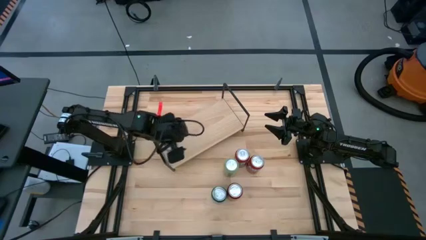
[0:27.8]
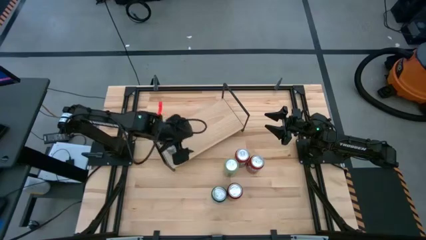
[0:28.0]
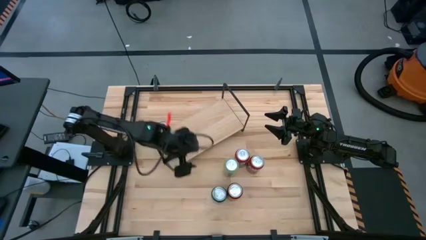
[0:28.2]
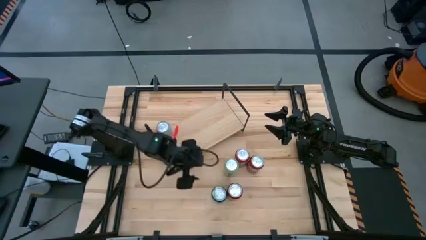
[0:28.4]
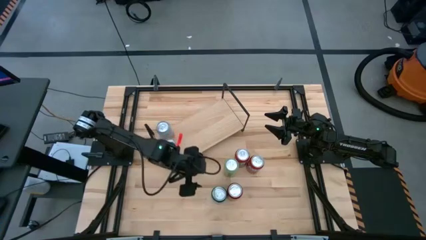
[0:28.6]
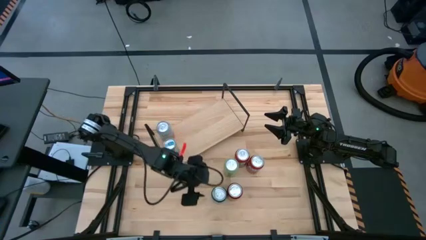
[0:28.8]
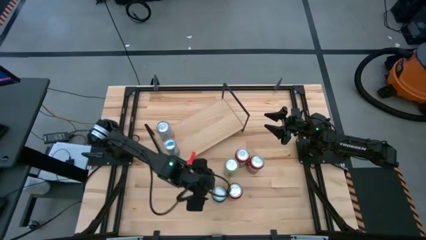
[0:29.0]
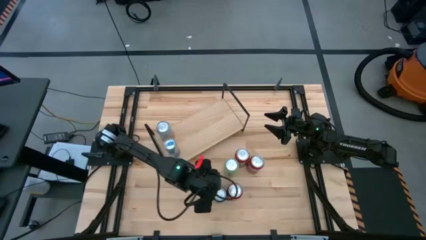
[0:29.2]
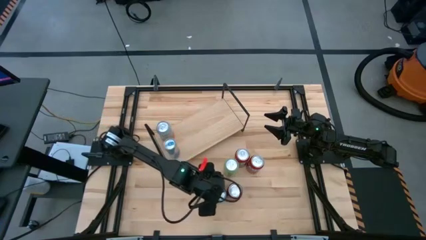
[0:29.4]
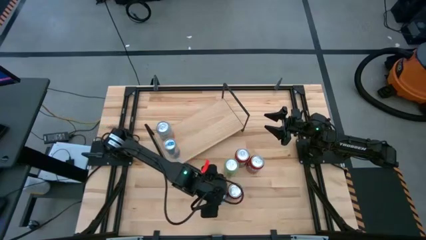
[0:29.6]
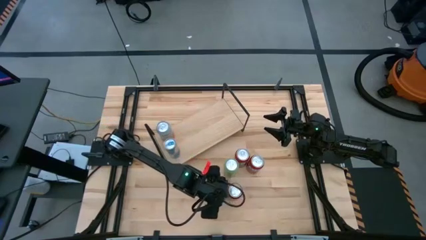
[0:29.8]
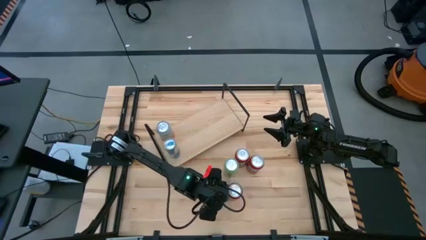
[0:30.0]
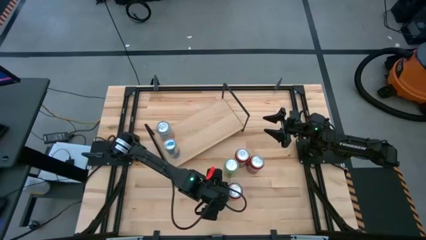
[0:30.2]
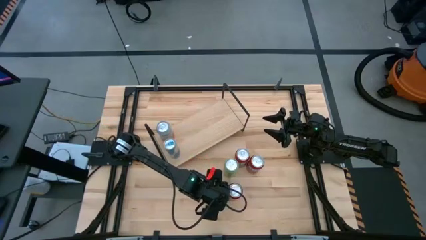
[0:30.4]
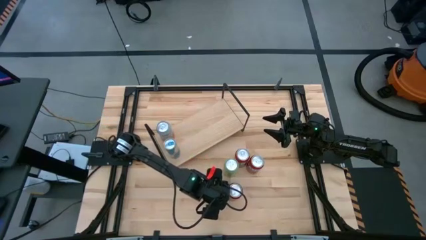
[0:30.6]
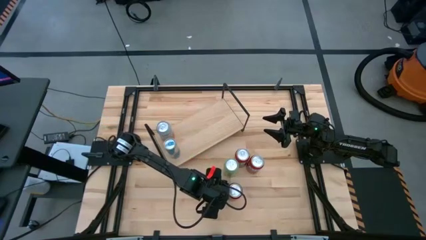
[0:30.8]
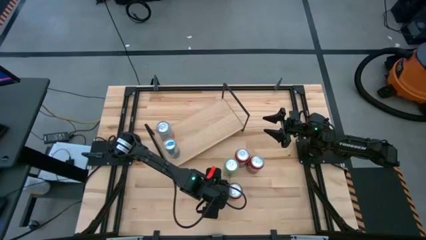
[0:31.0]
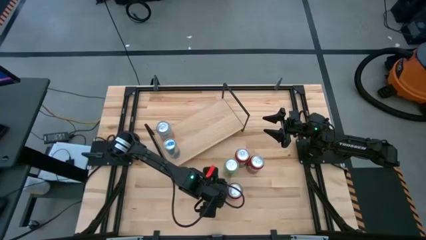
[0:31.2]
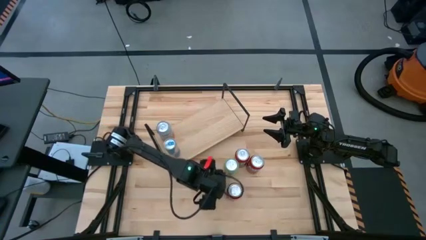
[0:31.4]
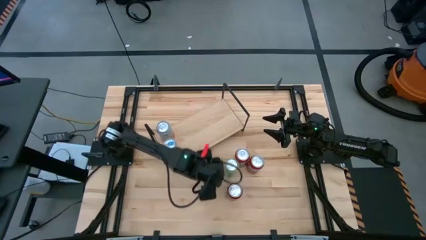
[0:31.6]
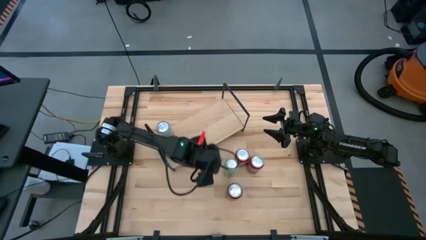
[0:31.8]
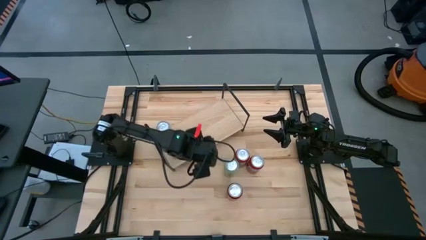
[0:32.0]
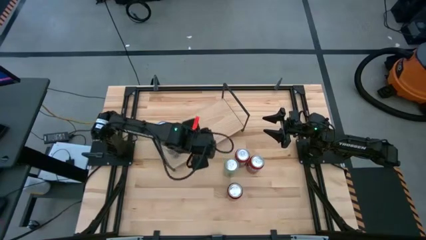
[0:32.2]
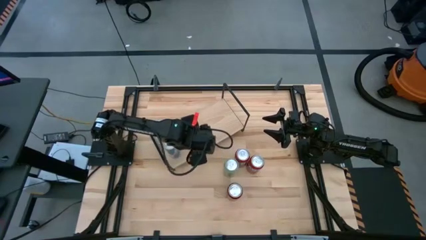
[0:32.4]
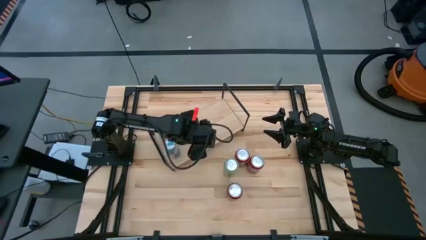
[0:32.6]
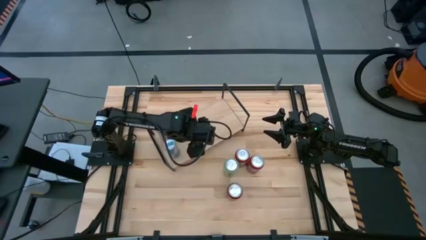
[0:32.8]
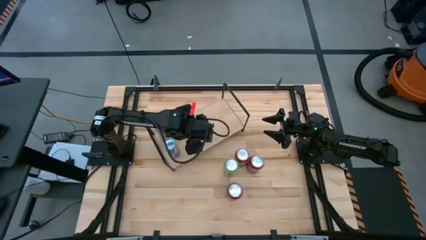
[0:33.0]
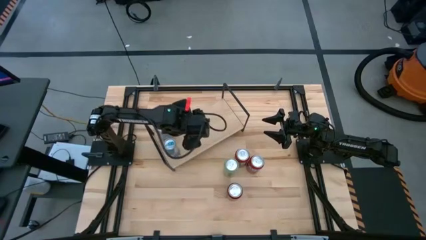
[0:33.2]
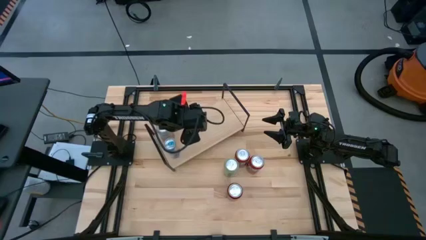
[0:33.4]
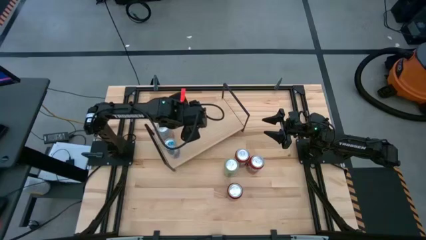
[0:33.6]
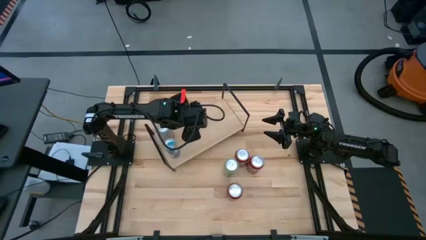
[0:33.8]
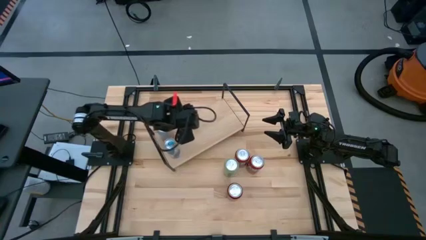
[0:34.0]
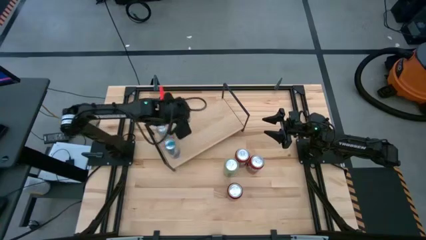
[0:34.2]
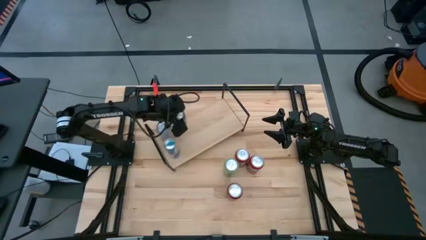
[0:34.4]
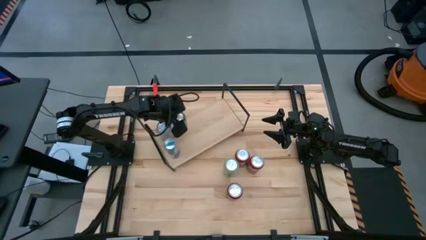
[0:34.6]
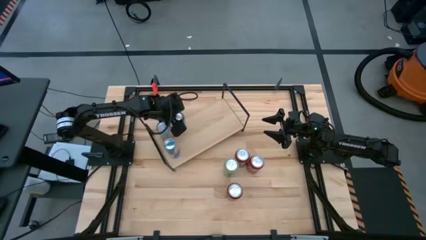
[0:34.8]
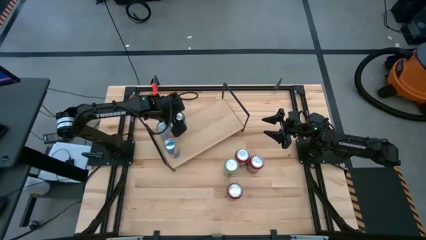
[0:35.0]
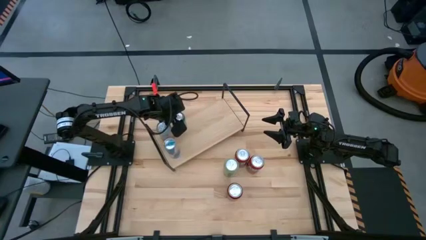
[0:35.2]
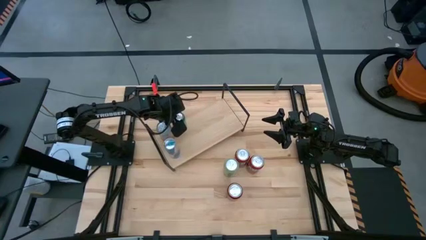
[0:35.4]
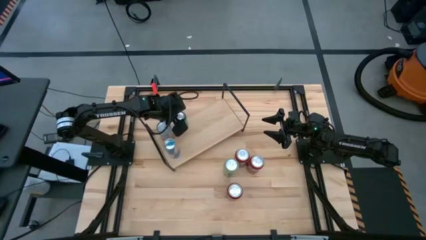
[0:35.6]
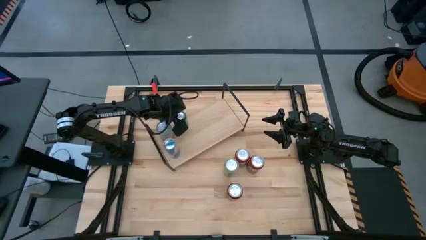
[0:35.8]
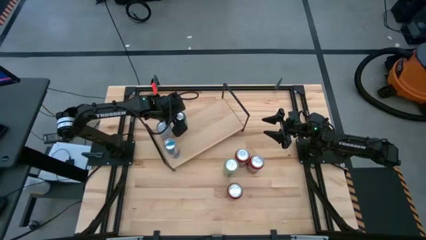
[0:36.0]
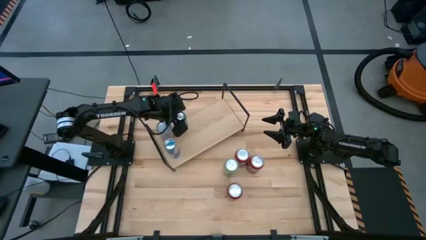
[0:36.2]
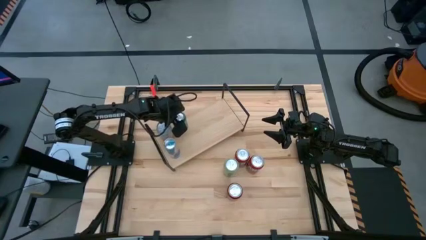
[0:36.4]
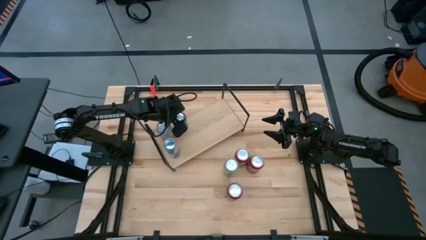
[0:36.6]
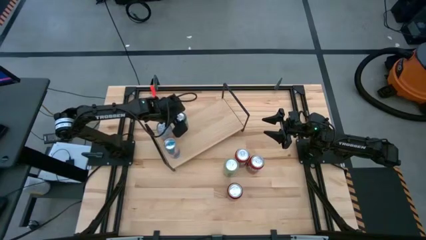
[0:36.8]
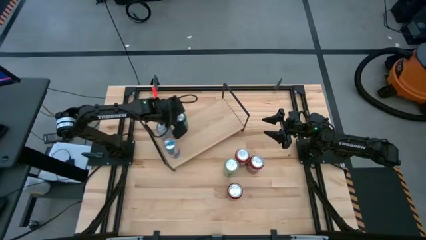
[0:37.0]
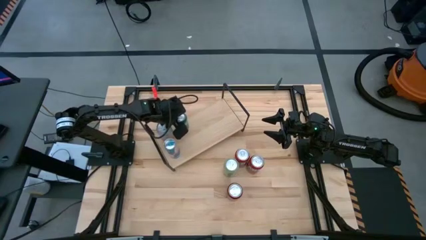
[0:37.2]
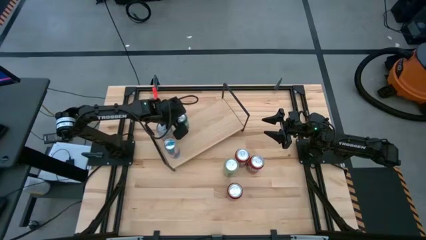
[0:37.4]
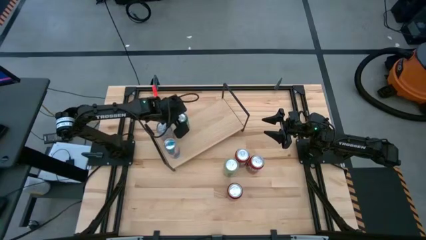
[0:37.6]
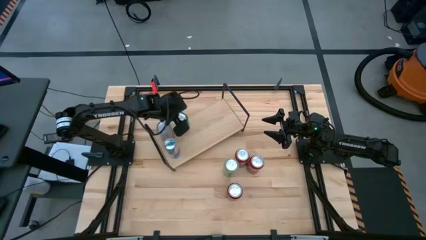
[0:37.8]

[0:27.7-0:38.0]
Task: Place canned beverage on shelf
Put the green soda can on the shelf
